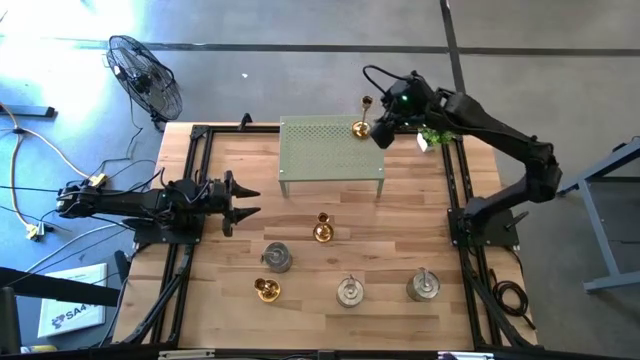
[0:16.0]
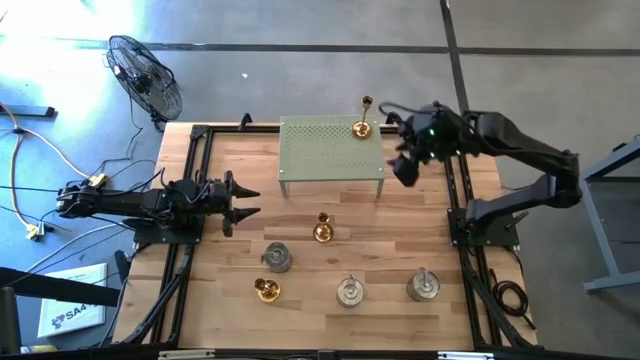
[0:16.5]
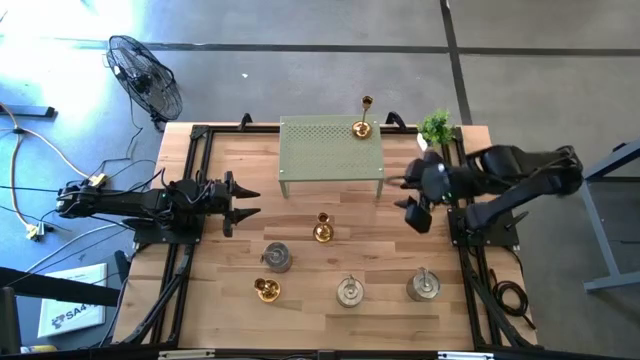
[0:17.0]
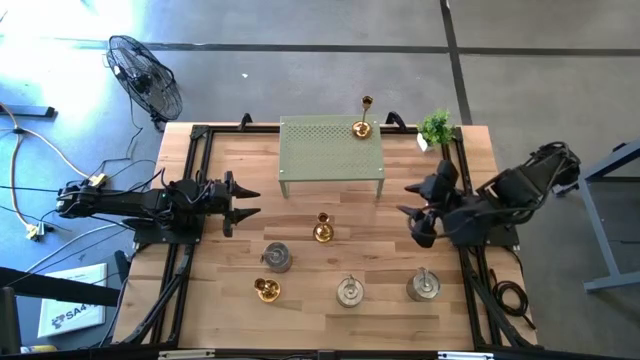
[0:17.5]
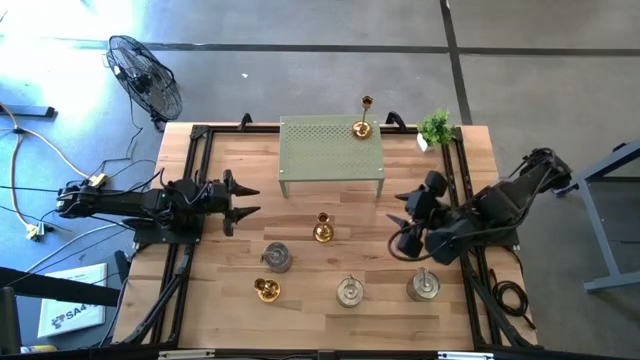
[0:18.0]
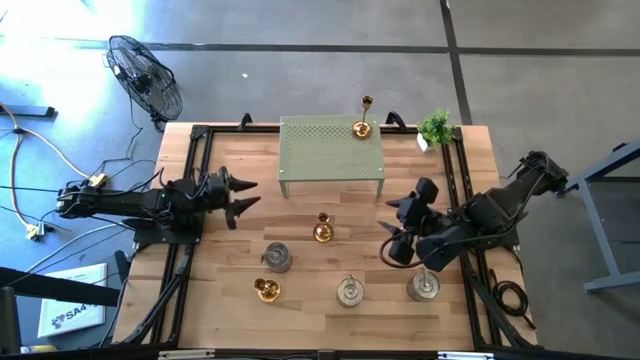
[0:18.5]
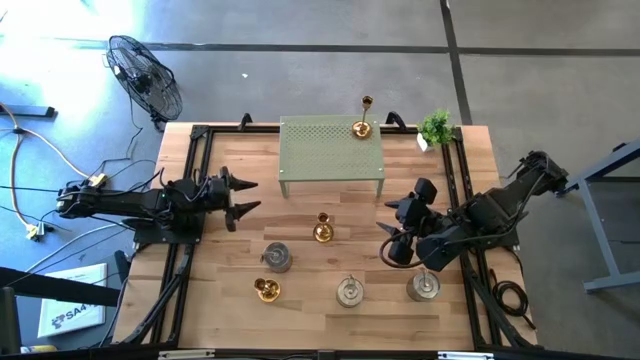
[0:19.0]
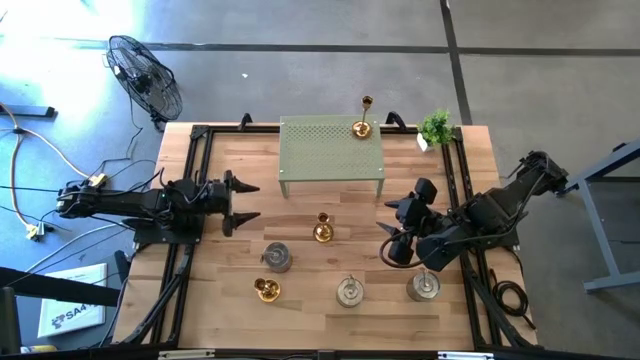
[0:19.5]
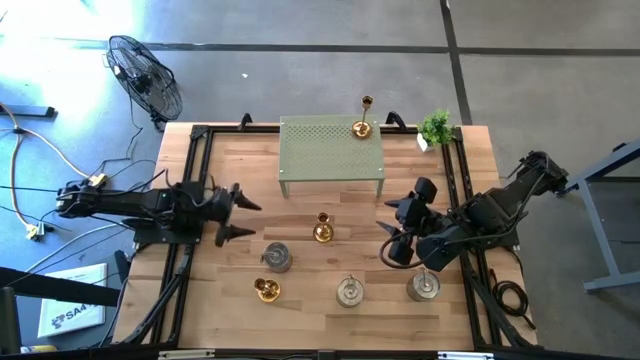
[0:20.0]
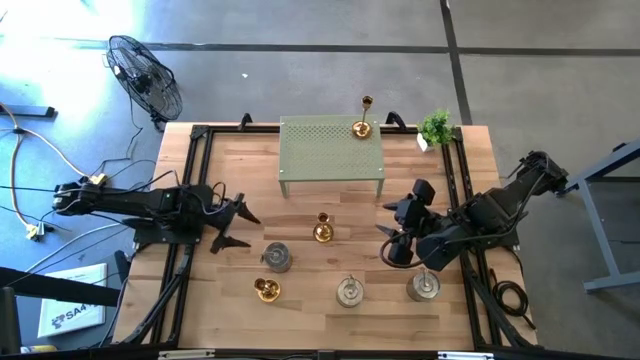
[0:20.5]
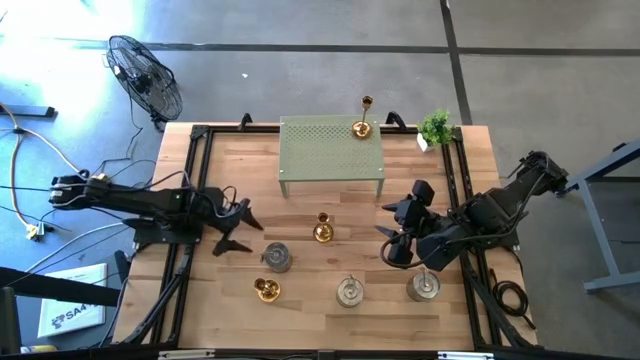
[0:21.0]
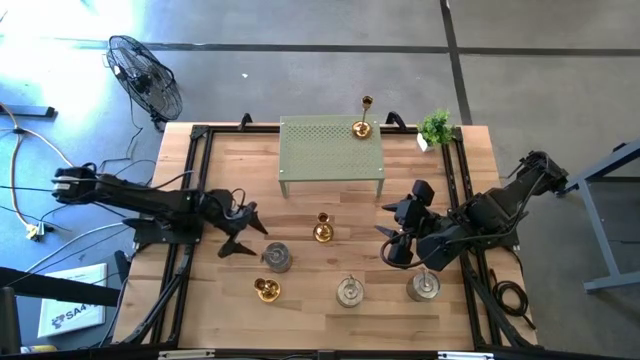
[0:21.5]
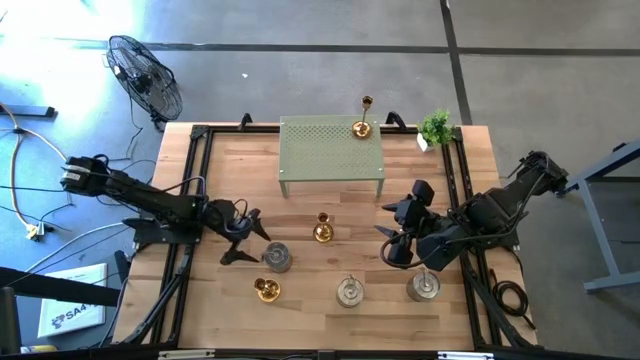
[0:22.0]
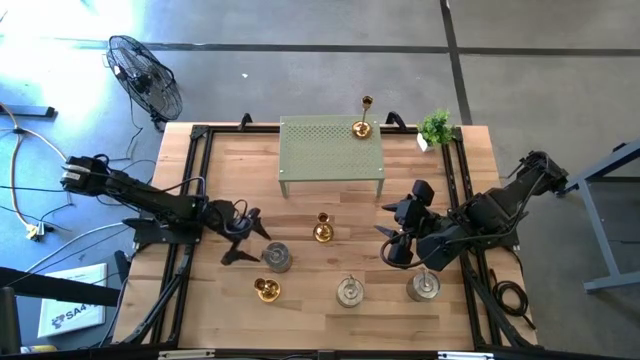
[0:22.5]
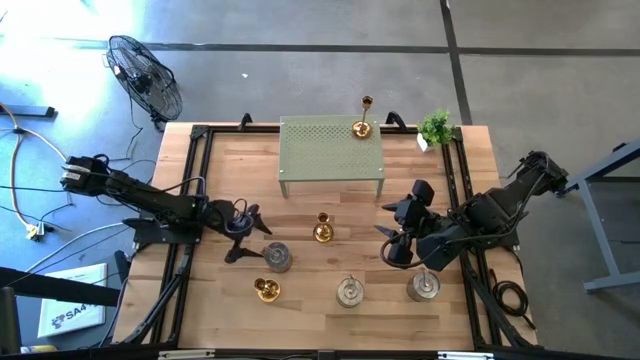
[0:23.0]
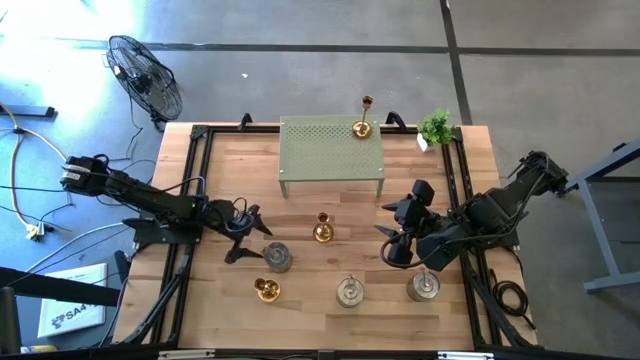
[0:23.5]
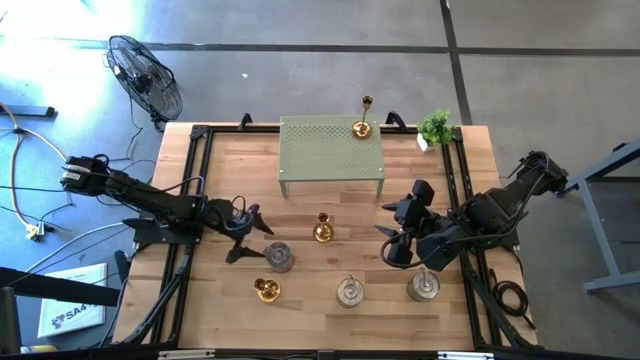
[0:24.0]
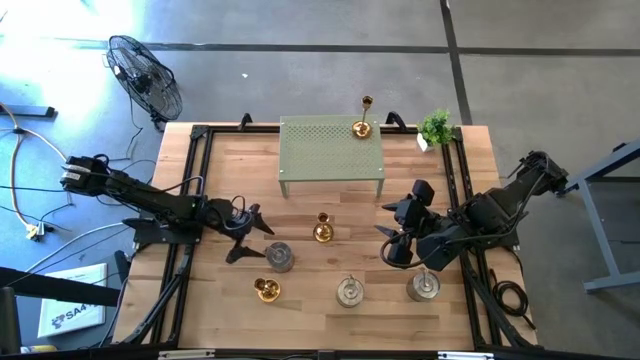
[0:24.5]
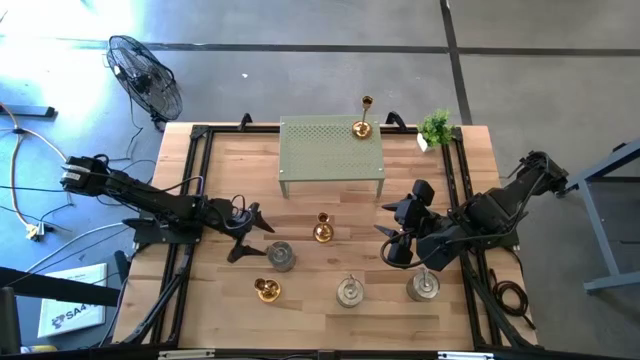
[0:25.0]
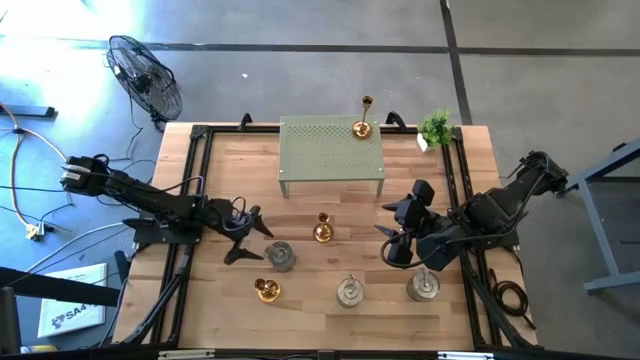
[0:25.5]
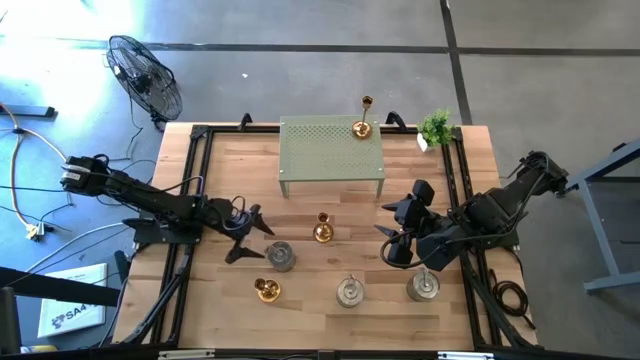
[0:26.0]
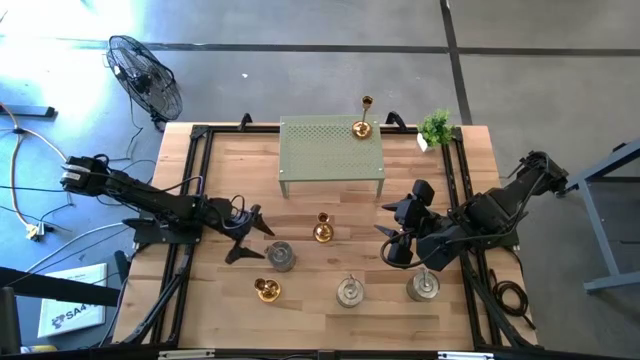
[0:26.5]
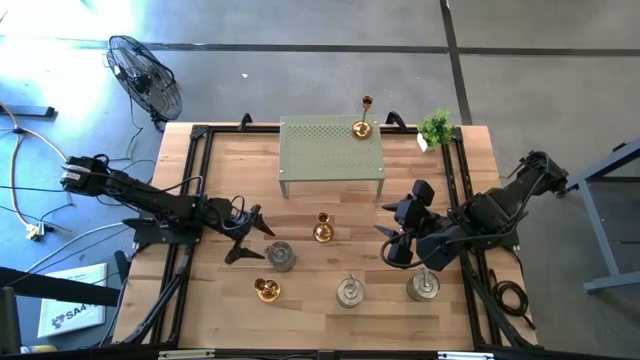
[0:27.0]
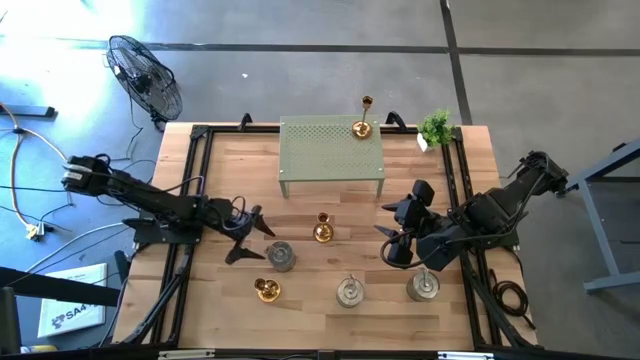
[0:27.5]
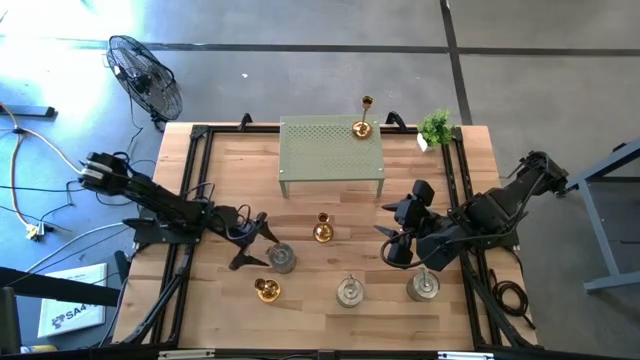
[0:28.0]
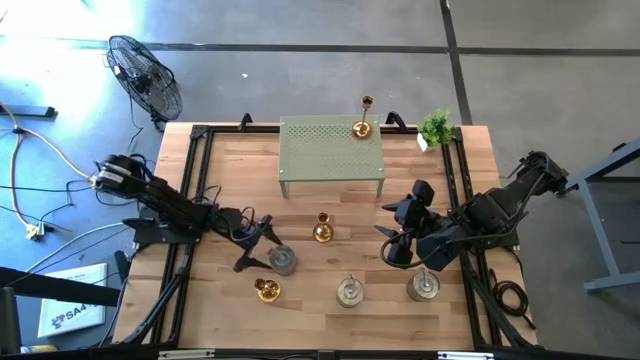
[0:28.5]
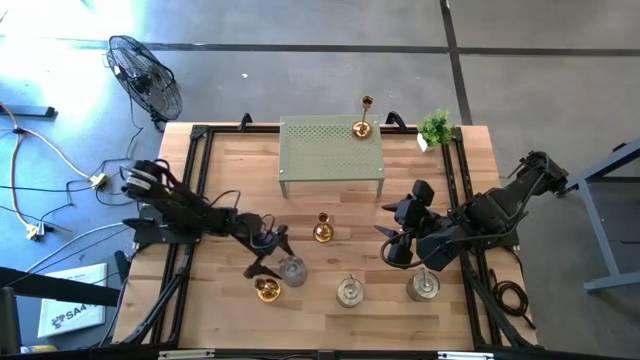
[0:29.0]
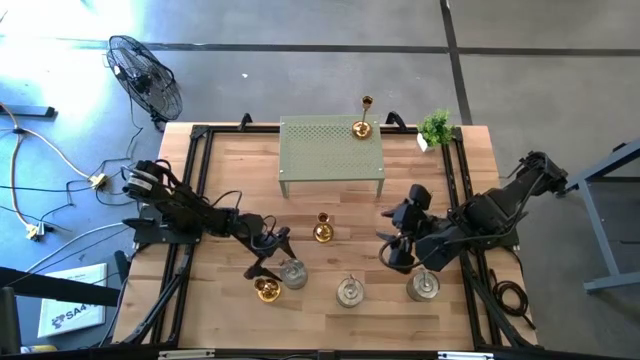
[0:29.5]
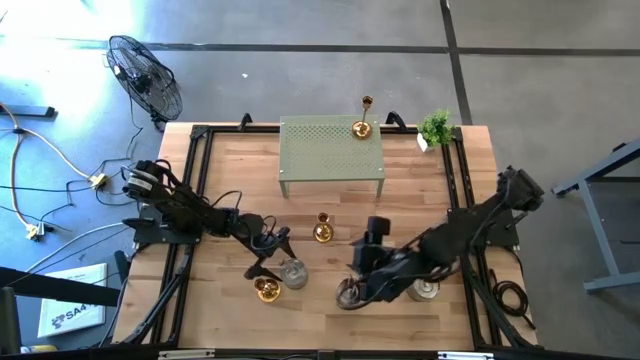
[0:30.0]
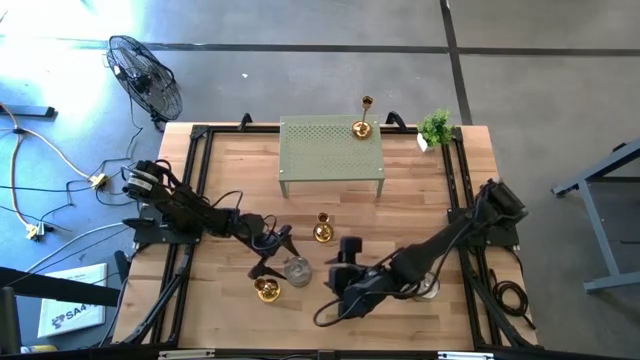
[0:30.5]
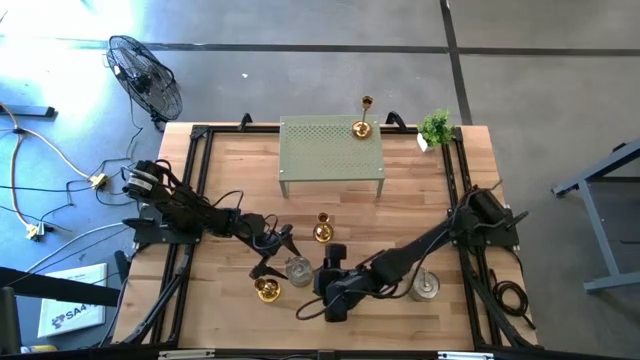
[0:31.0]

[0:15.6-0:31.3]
Task: Pick & Place candle stick holders
Put the top silver scented candle on the shelf

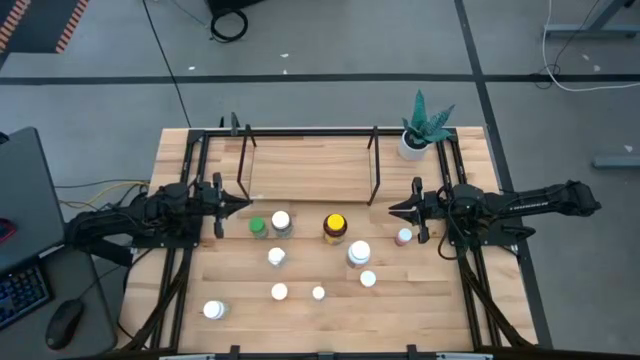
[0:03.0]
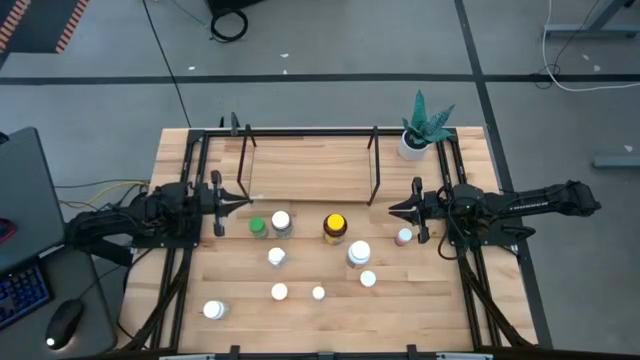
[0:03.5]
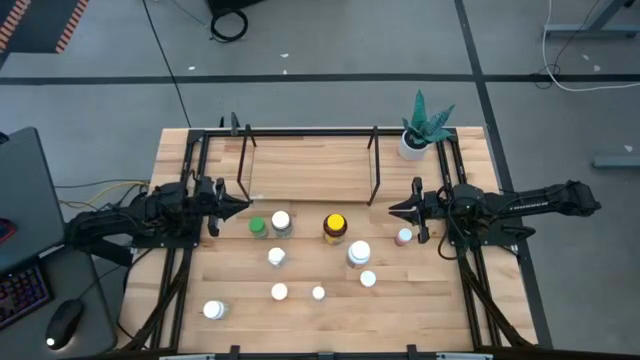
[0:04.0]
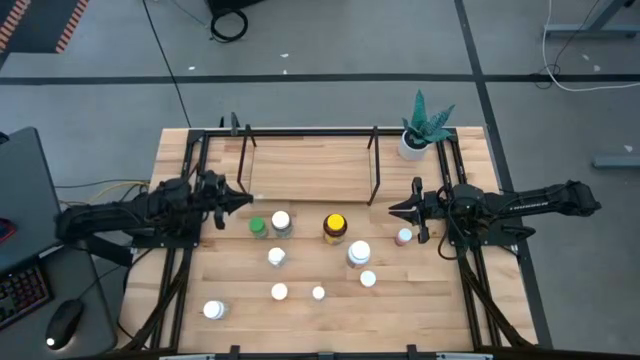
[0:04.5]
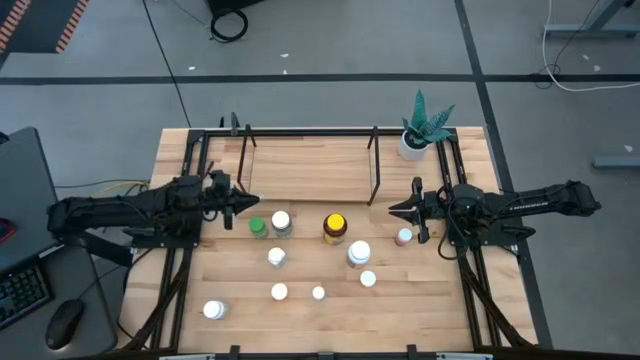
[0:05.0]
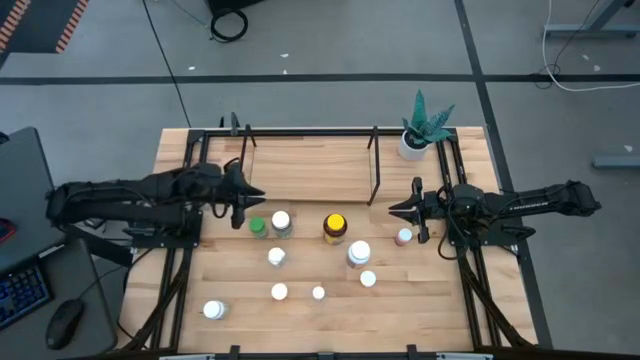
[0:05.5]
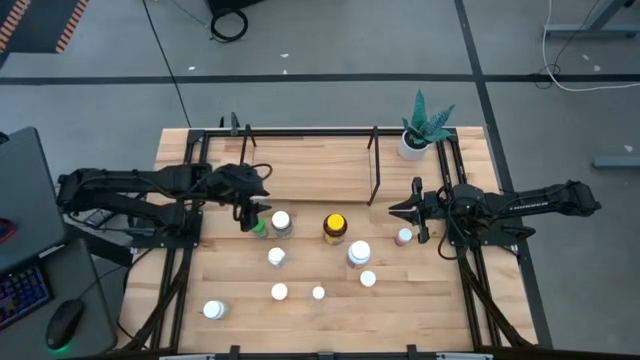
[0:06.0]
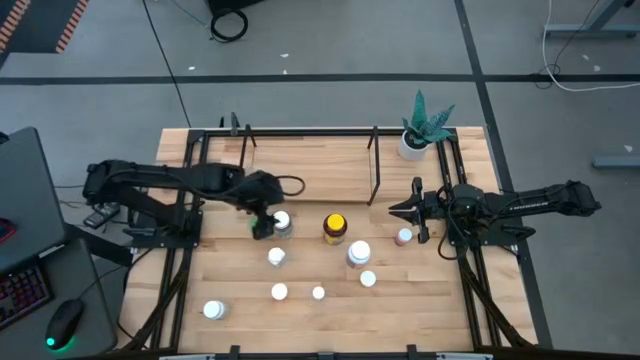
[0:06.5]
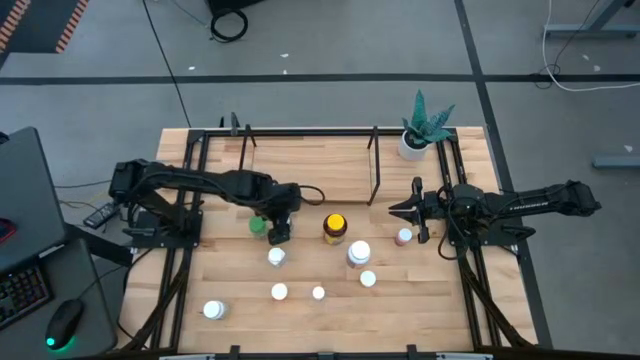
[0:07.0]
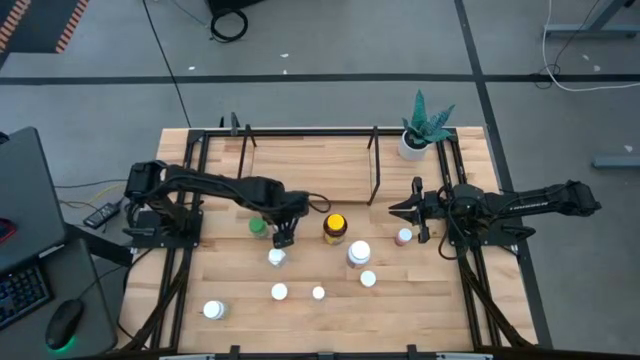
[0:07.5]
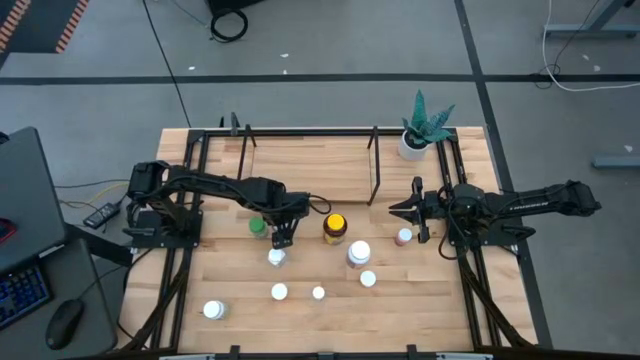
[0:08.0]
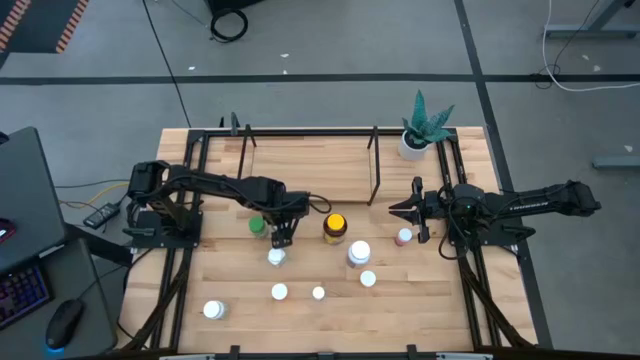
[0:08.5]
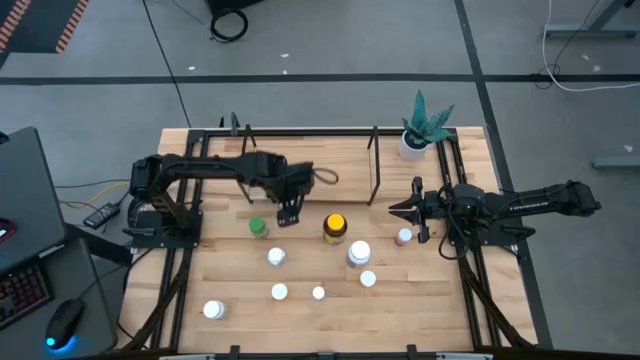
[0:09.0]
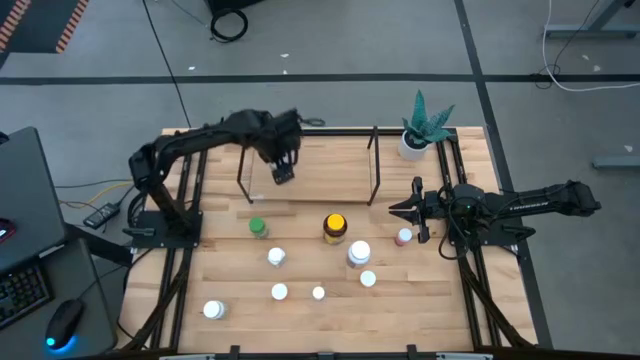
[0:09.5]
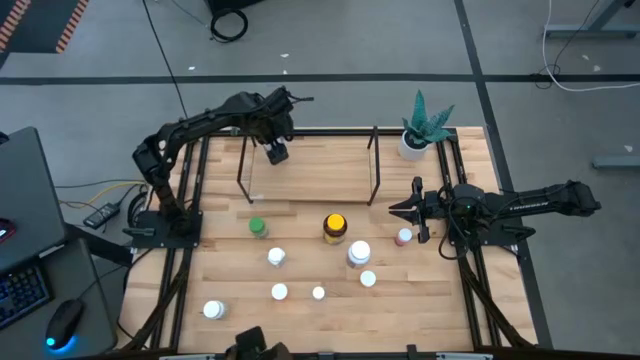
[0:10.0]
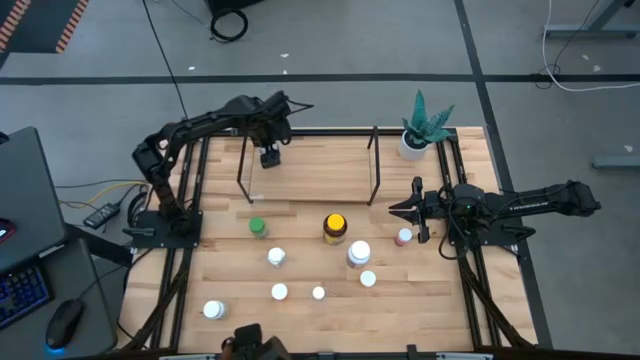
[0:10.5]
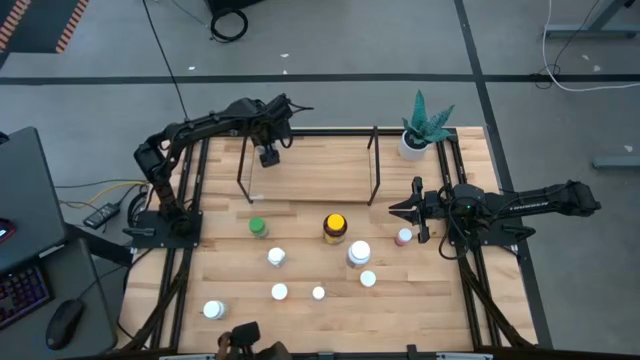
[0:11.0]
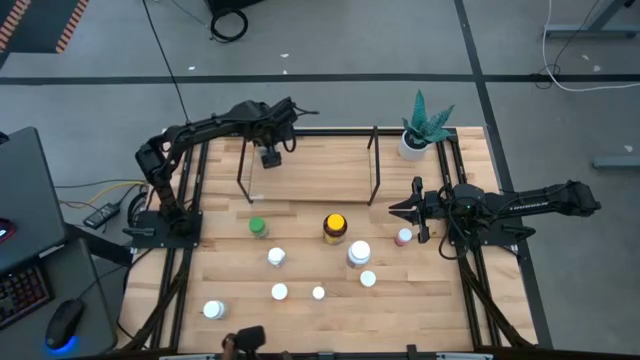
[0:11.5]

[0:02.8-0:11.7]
Task: Pick and place medicine bottles onto shelf by color
Put the transparent pill bottle on the shelf
